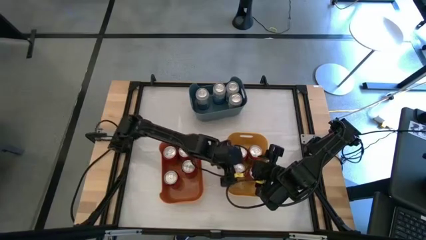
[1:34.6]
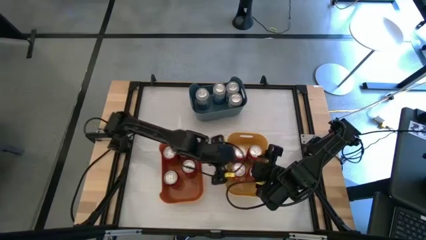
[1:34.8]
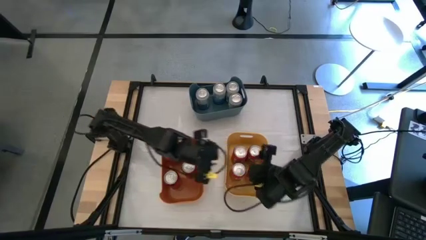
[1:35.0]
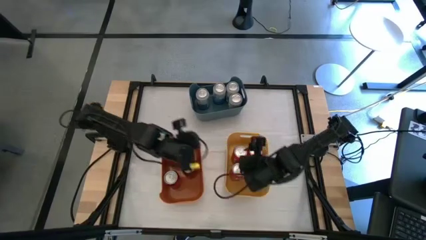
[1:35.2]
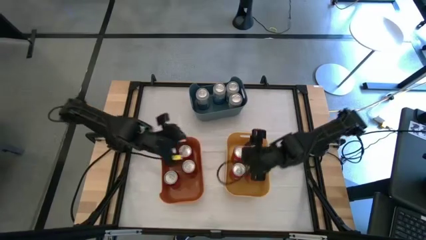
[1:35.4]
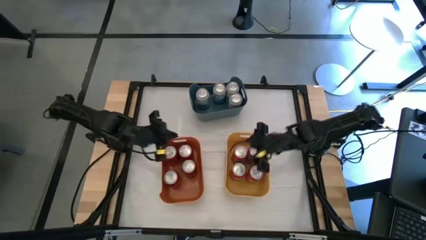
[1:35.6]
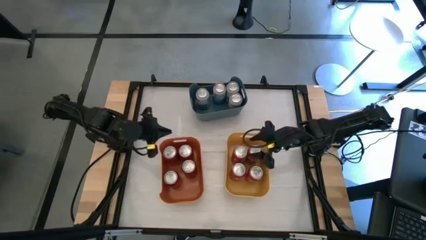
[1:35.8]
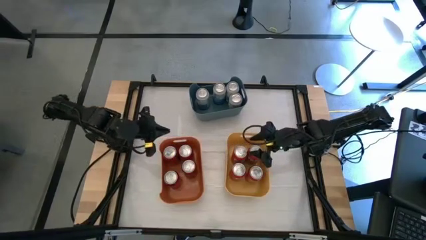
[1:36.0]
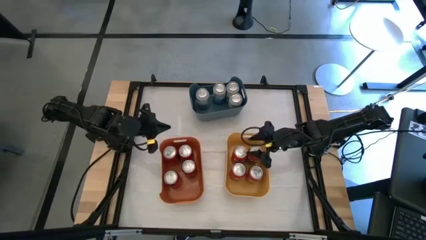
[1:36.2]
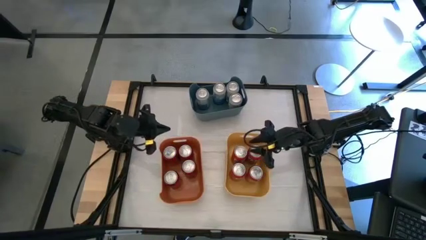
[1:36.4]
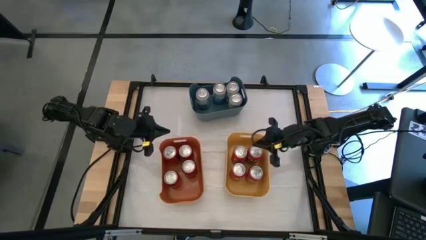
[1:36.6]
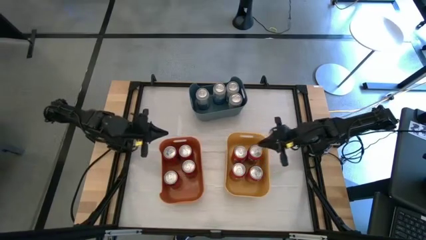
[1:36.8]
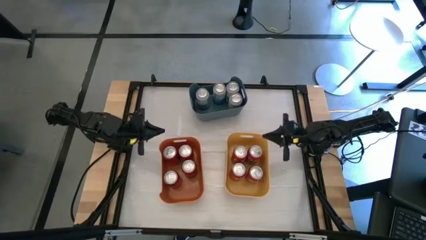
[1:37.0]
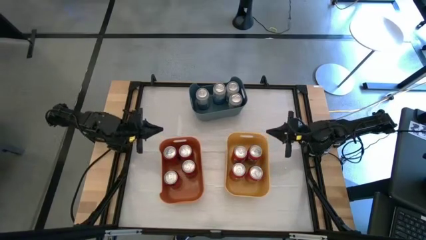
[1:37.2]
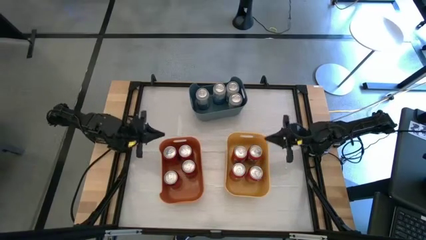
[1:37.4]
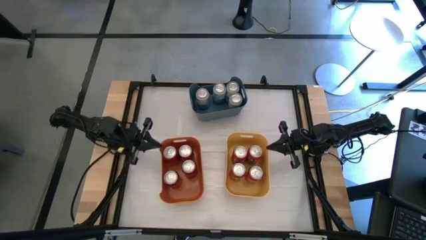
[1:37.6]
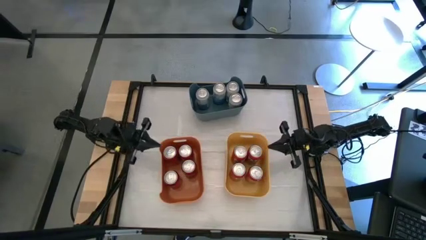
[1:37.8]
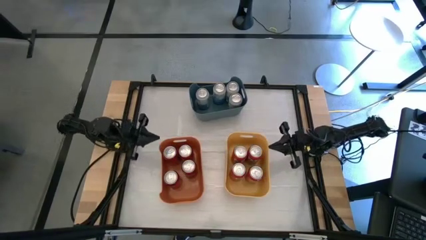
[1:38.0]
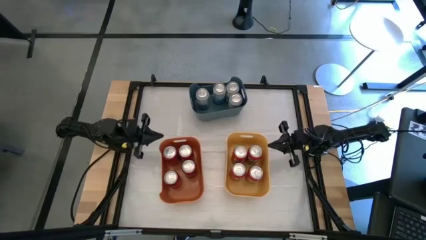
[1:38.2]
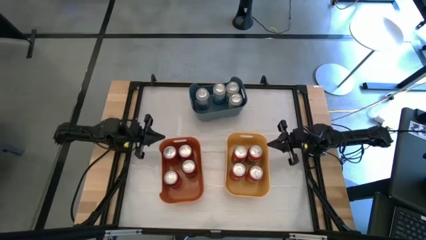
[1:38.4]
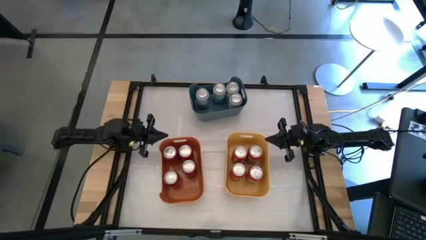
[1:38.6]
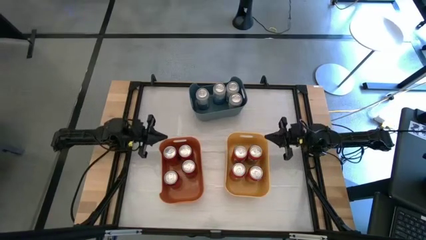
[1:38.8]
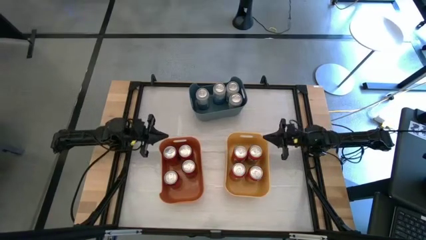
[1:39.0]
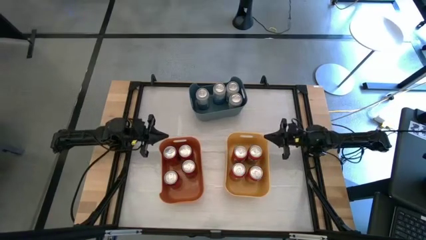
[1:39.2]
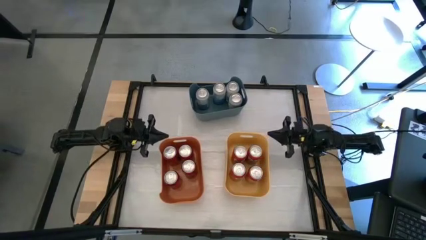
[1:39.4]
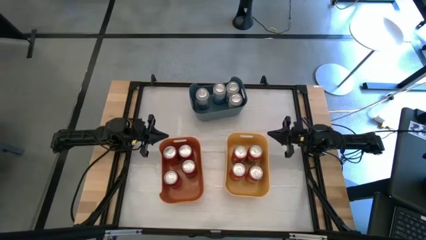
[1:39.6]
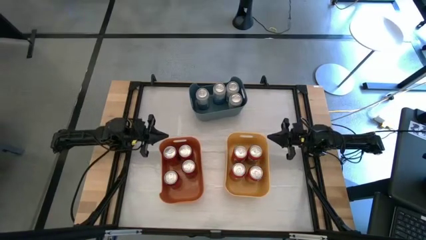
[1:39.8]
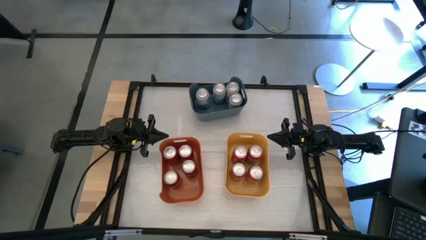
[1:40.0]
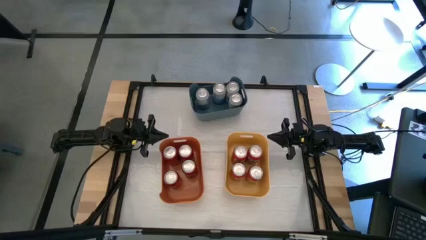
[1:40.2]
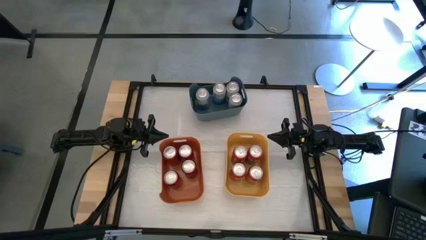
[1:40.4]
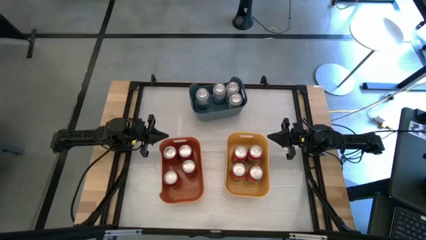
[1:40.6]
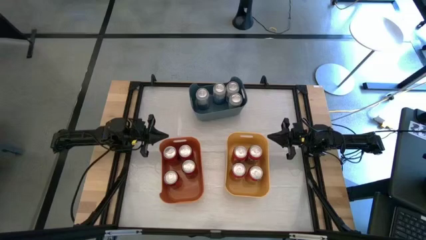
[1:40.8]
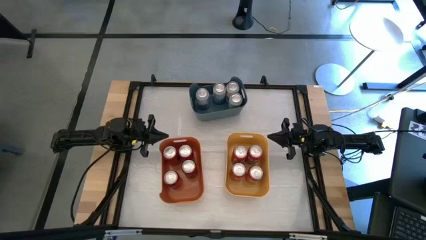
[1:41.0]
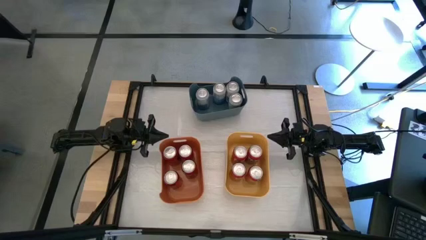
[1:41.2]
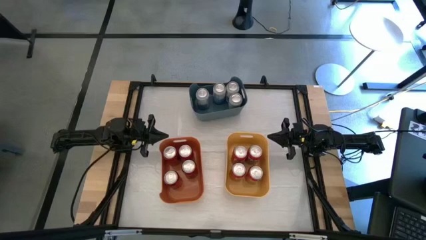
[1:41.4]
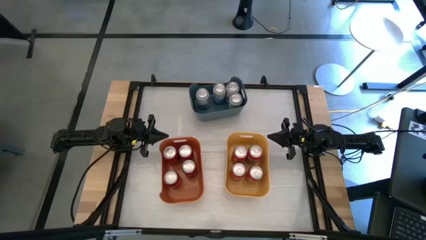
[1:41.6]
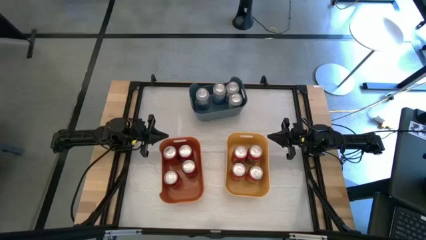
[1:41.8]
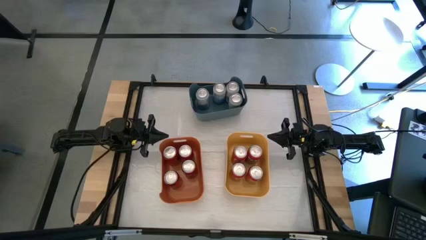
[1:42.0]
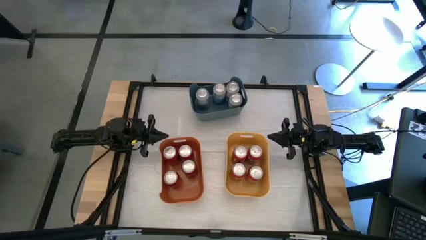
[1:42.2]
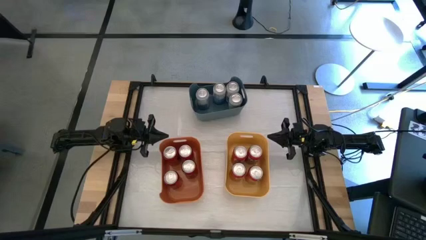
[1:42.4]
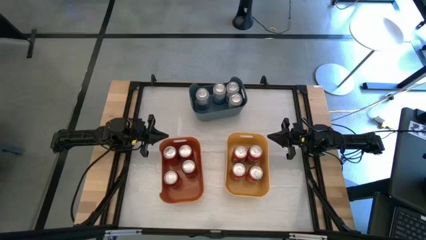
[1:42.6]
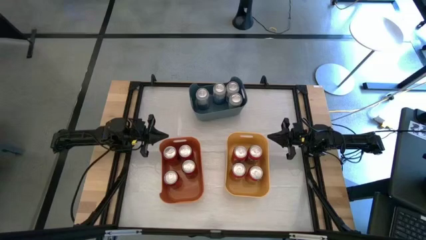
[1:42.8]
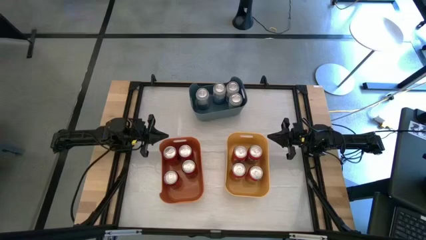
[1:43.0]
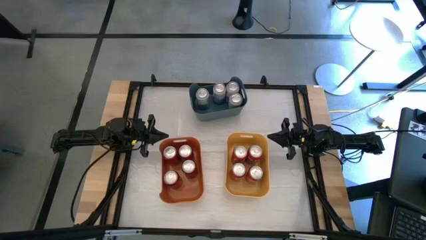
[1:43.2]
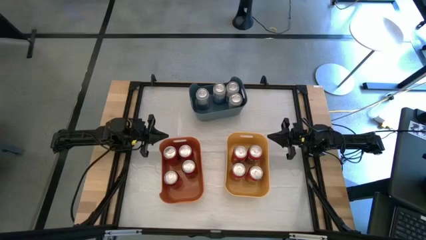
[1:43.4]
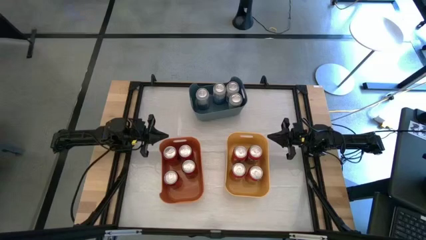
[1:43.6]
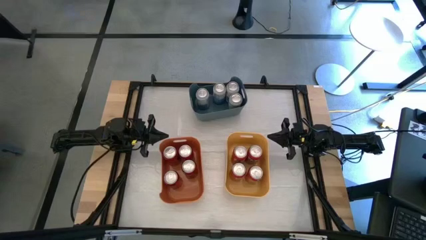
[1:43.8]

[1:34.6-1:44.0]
Task: Sort soda cans
Return to Home Position
